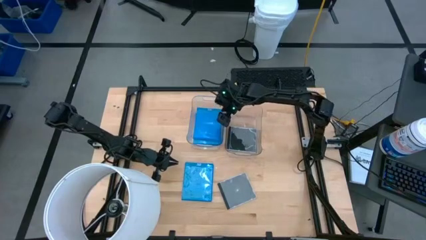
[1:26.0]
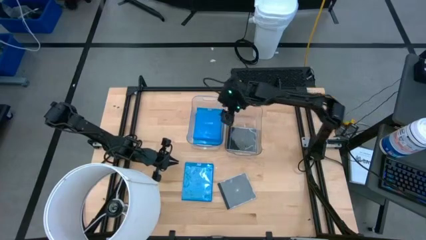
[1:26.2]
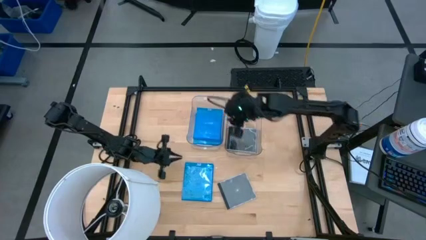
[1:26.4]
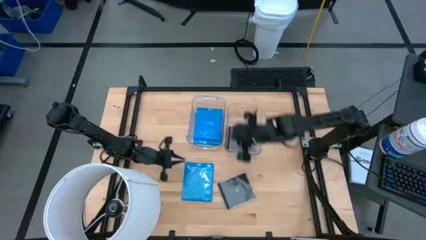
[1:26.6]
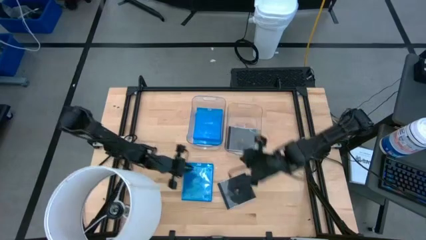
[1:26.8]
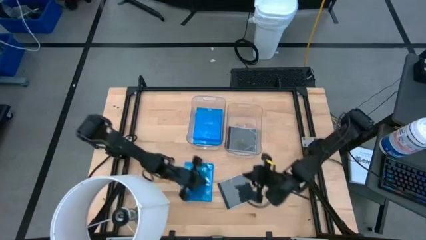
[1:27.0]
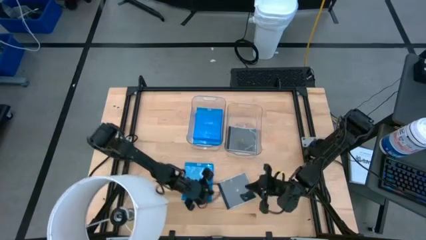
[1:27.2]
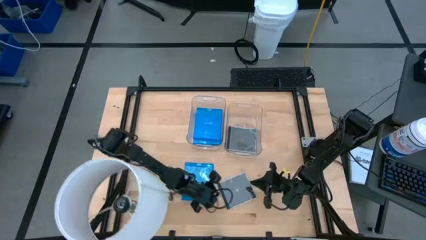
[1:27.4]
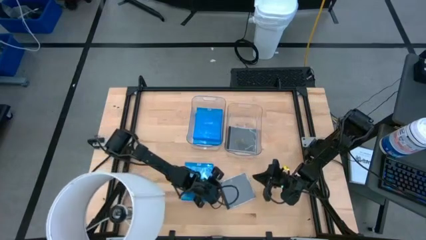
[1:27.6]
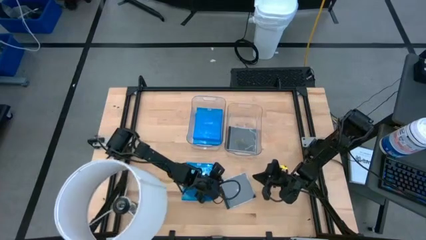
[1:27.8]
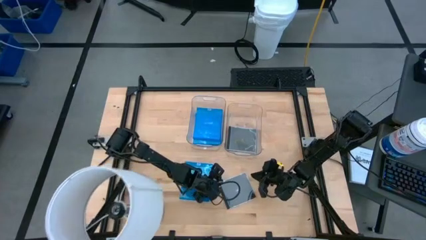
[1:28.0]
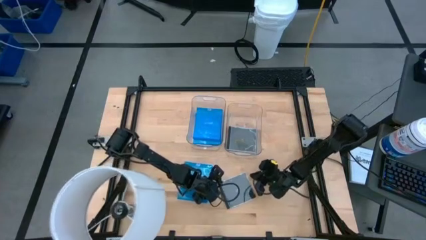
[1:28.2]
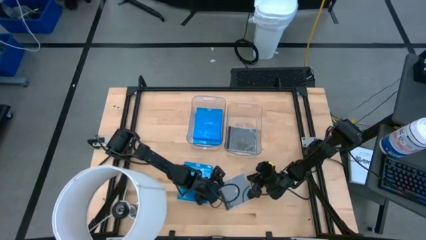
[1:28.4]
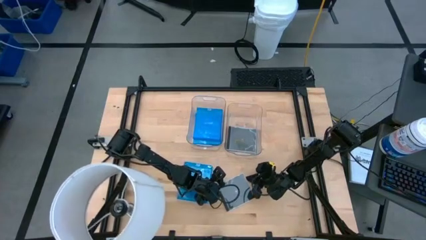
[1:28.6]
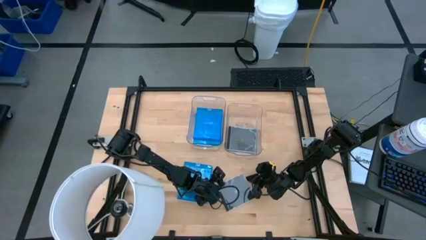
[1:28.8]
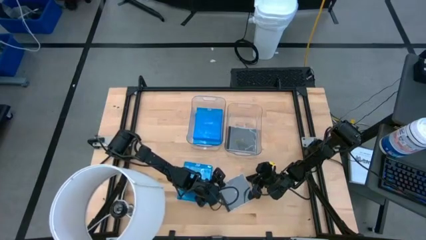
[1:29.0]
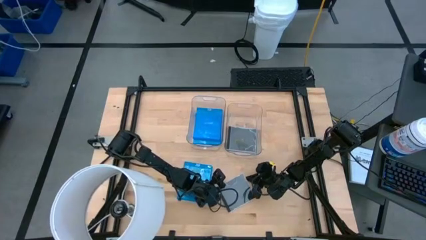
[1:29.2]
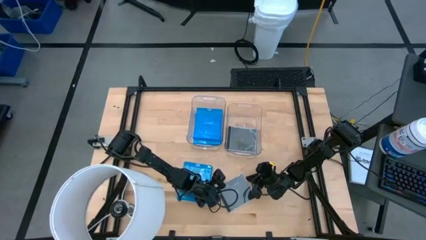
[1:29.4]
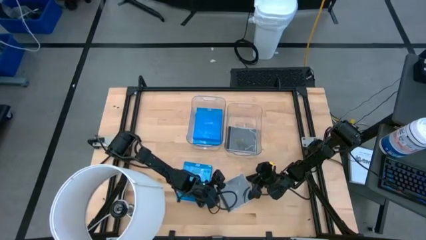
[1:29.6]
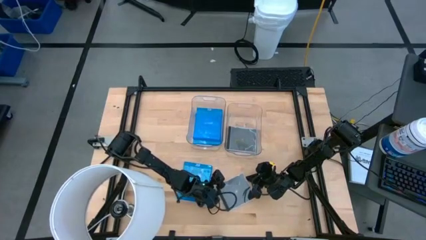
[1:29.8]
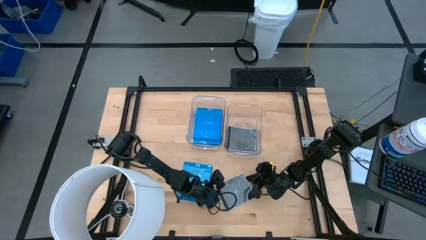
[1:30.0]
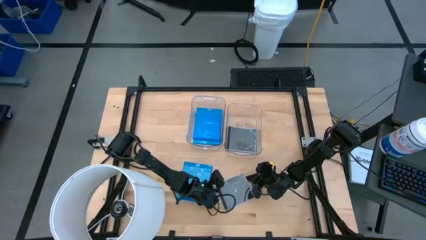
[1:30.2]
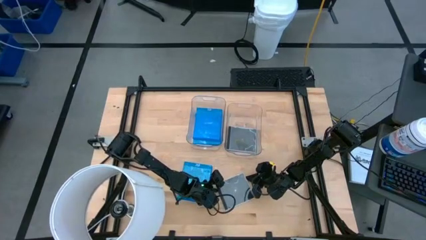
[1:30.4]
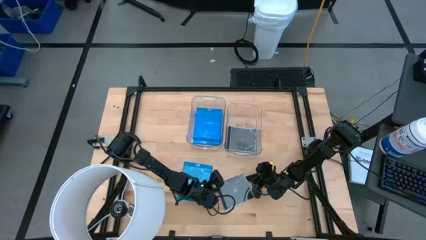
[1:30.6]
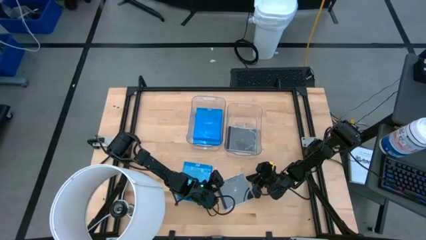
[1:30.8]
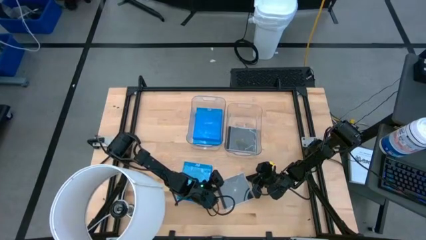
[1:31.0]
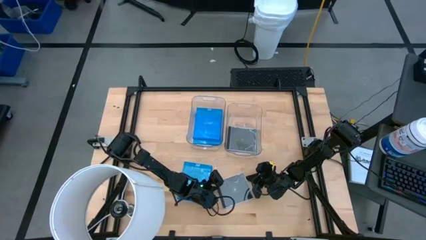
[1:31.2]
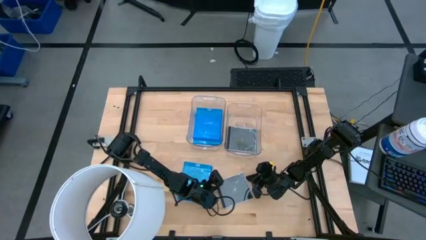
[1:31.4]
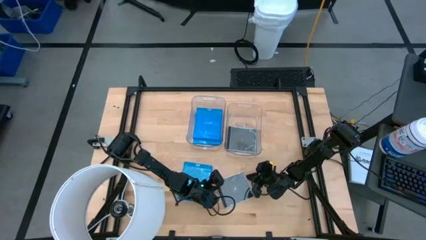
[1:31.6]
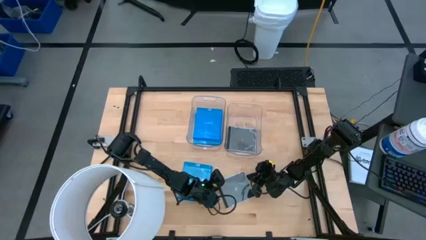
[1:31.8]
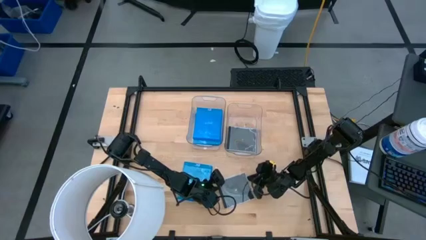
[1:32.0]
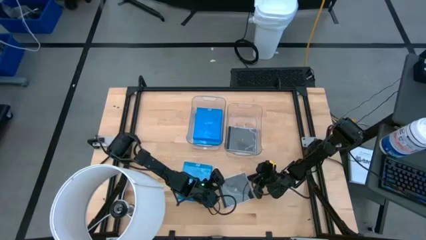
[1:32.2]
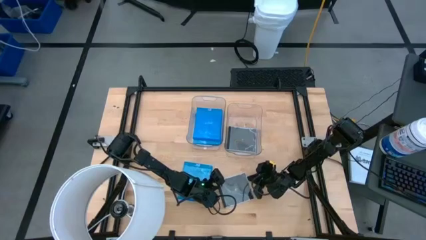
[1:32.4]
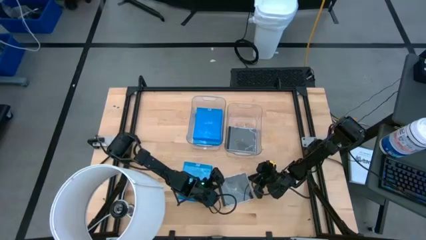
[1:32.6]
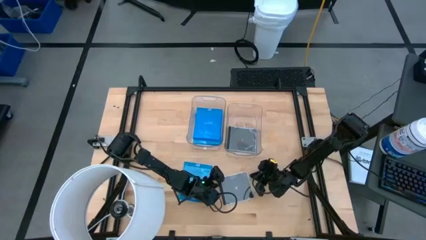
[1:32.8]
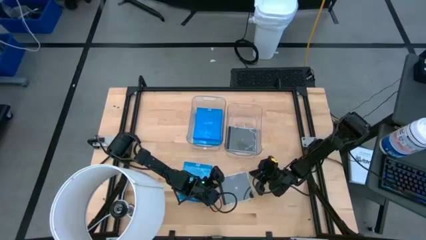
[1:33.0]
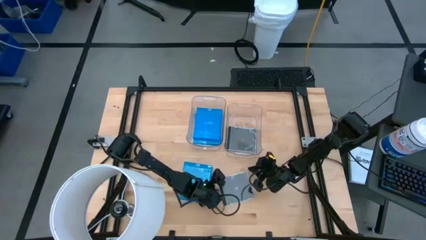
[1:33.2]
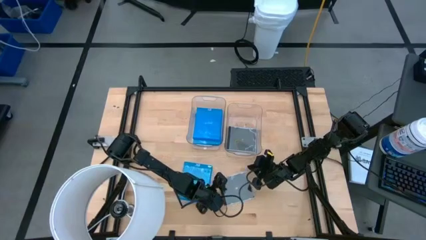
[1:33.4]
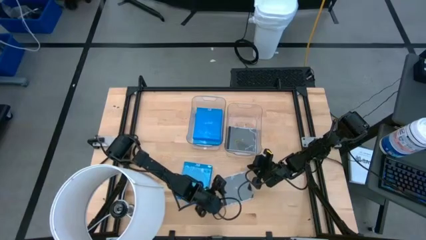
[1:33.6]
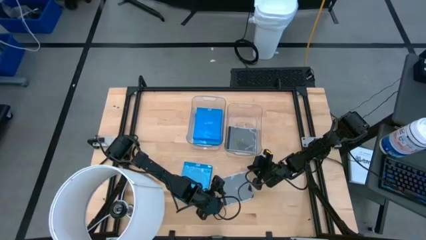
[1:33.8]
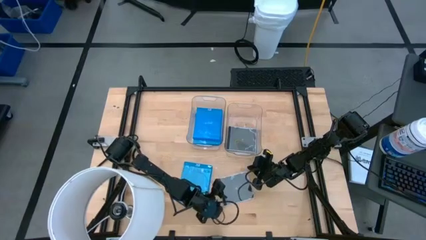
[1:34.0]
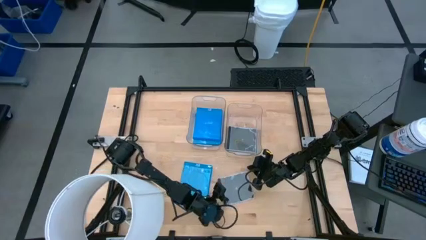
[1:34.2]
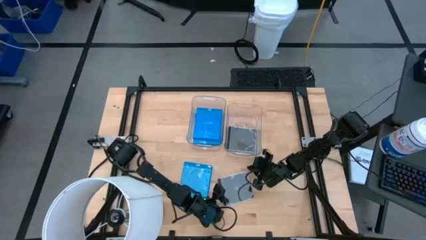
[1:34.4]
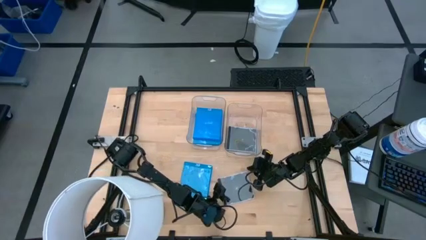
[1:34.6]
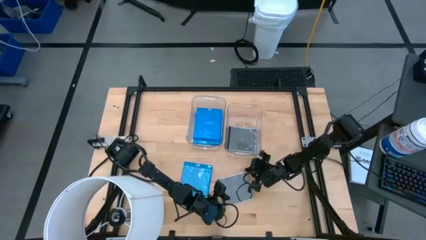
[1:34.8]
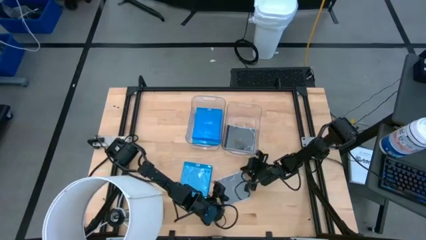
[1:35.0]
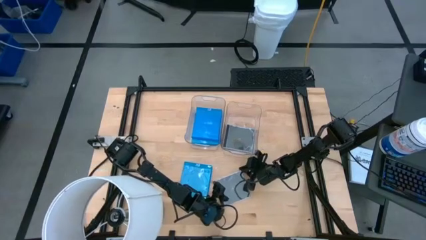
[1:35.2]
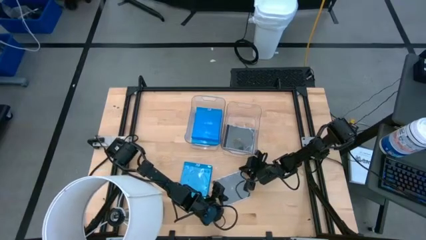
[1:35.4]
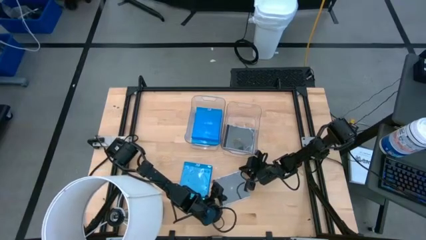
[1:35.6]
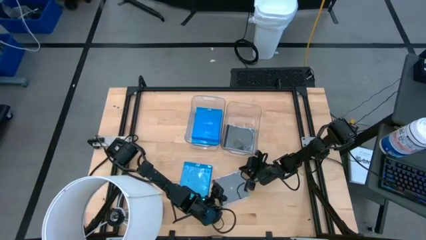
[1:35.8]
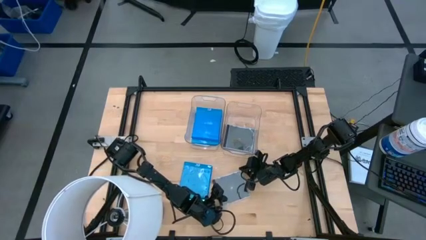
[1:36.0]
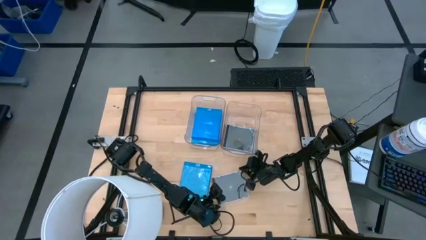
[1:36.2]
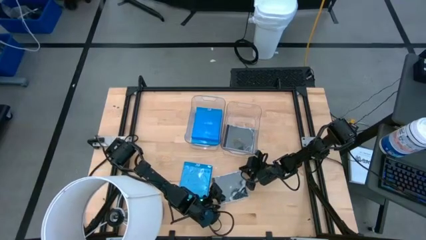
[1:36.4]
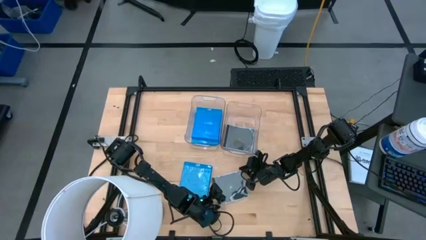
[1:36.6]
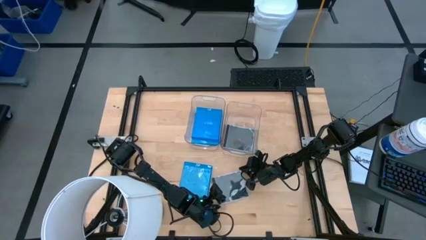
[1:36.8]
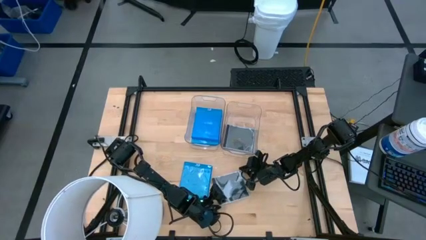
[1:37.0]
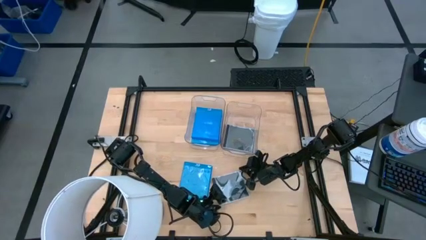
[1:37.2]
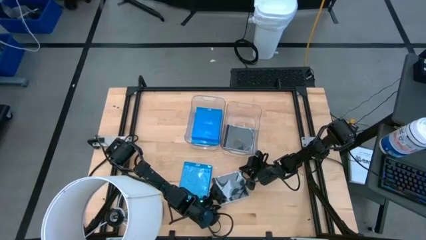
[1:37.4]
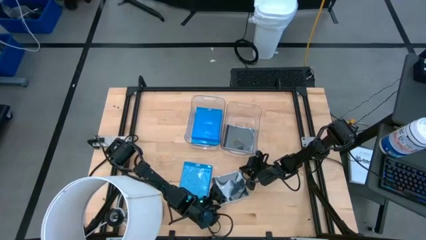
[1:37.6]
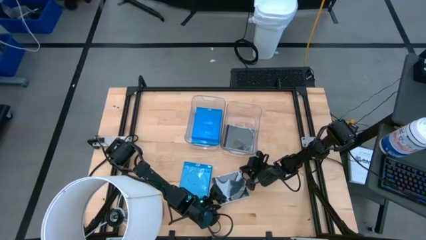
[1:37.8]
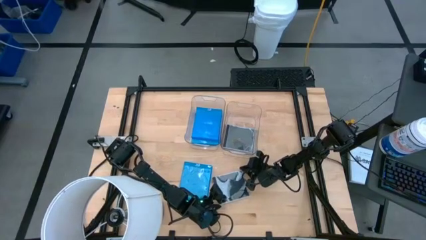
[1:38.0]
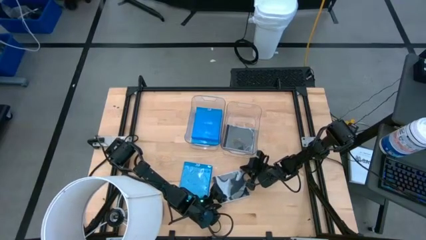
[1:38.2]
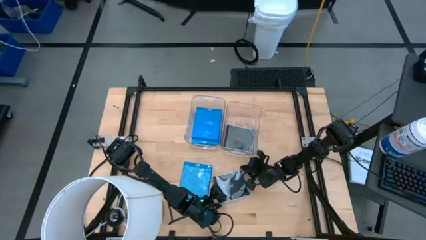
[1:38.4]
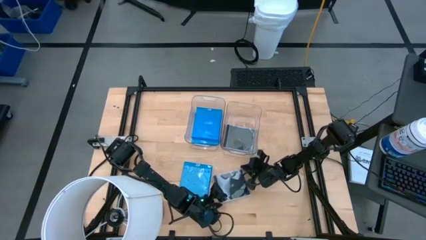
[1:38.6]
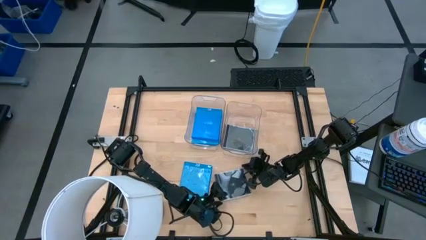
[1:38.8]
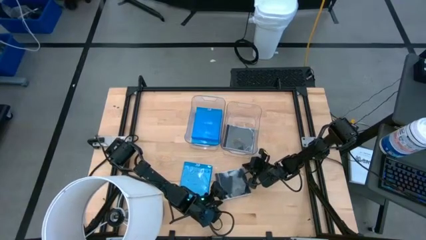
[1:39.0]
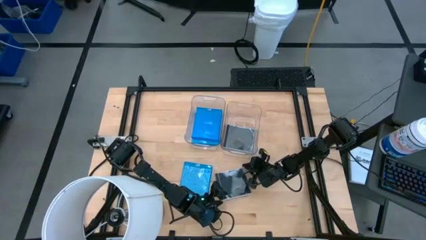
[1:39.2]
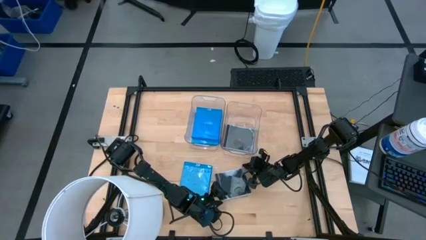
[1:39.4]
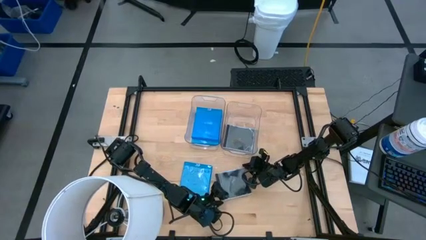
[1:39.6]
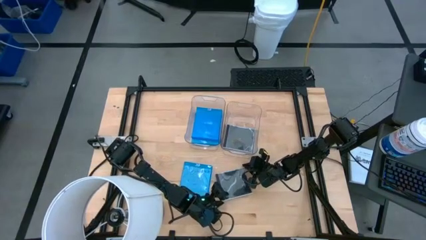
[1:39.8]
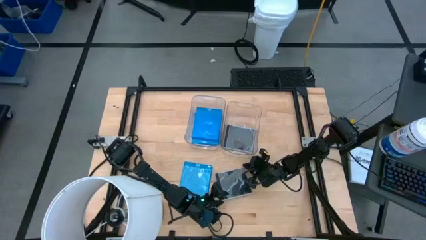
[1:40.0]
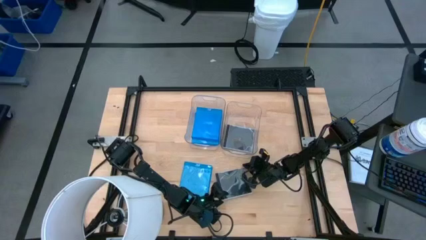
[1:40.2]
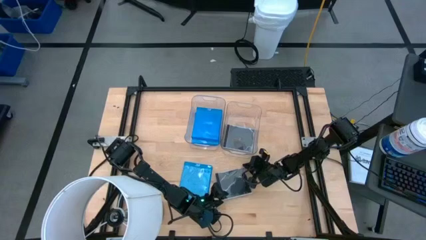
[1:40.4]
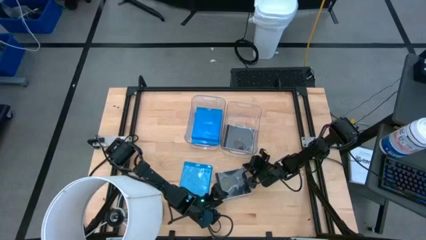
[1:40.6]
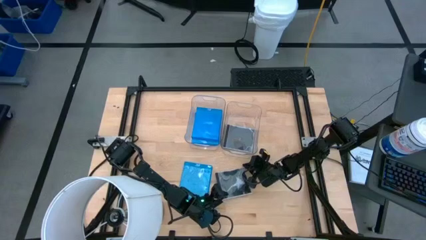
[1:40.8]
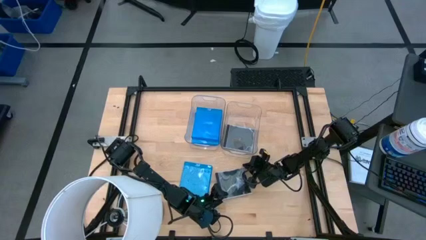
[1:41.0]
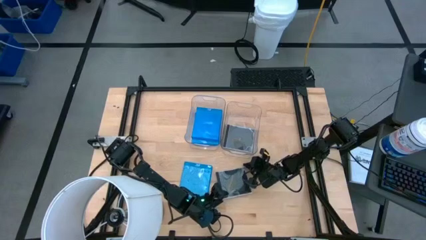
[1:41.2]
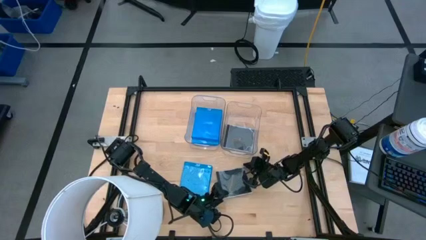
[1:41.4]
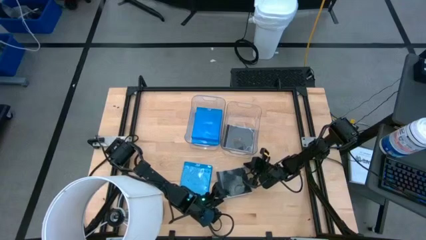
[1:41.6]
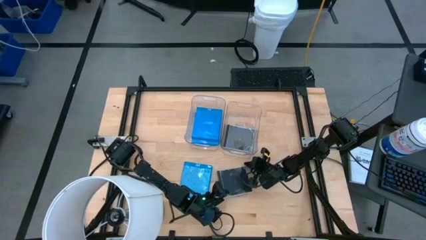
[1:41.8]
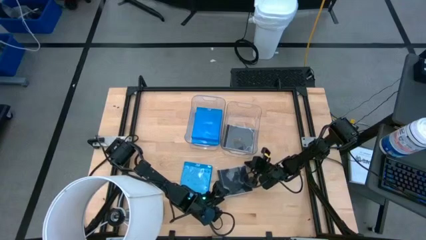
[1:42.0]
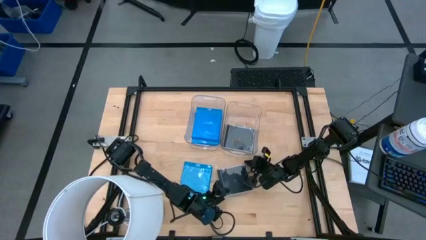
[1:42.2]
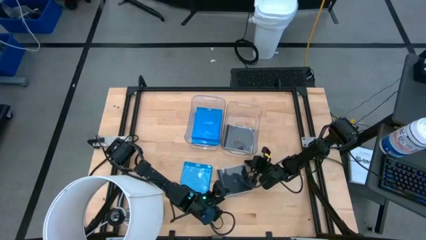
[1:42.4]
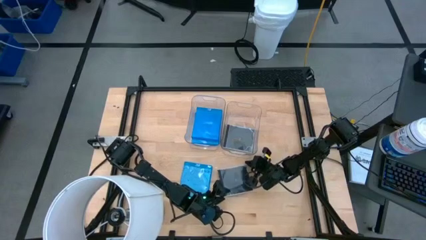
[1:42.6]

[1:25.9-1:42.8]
Task: Pick & place jewel cases by type
Put the black CD case into the right transparent bin
